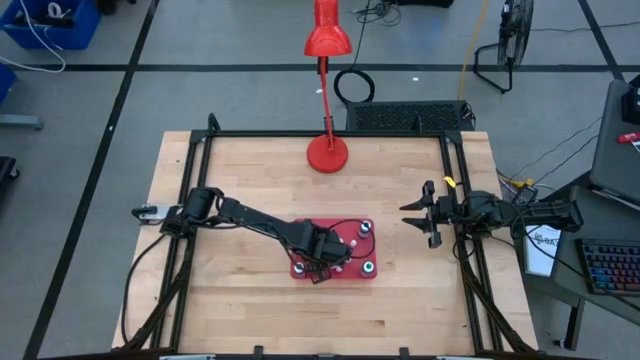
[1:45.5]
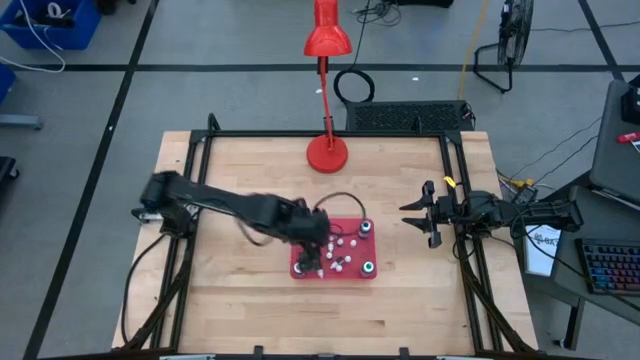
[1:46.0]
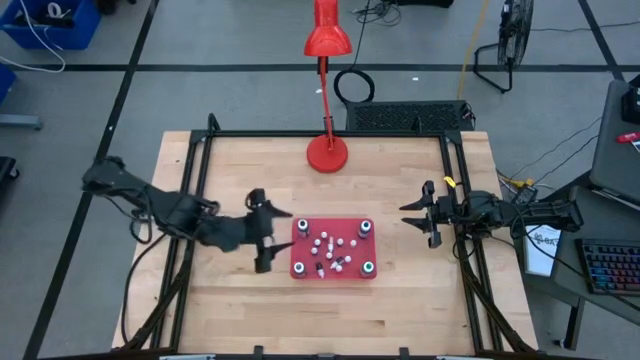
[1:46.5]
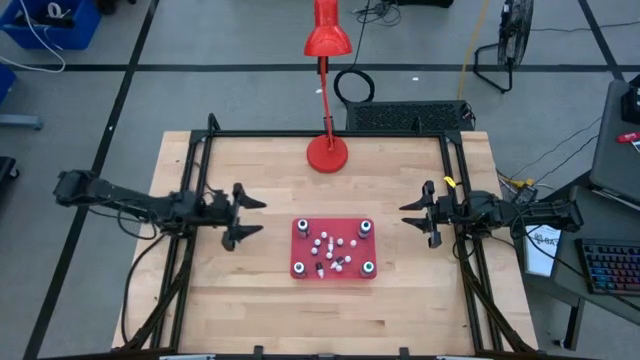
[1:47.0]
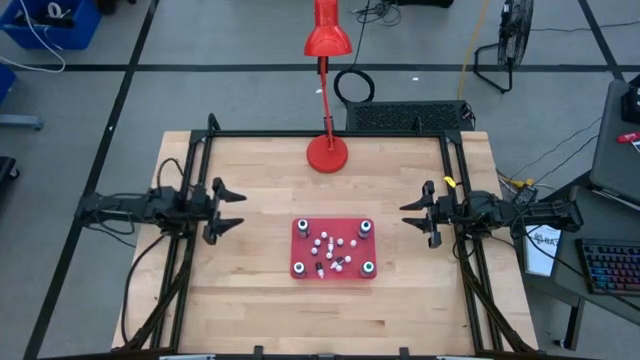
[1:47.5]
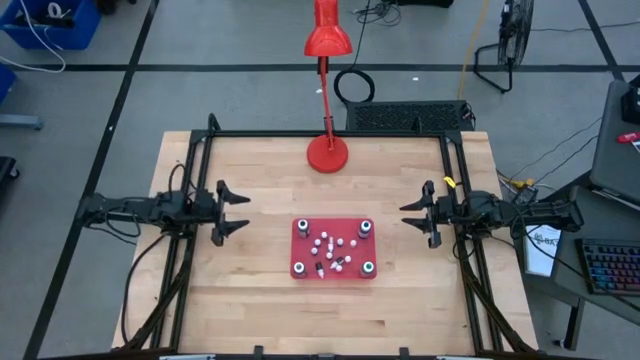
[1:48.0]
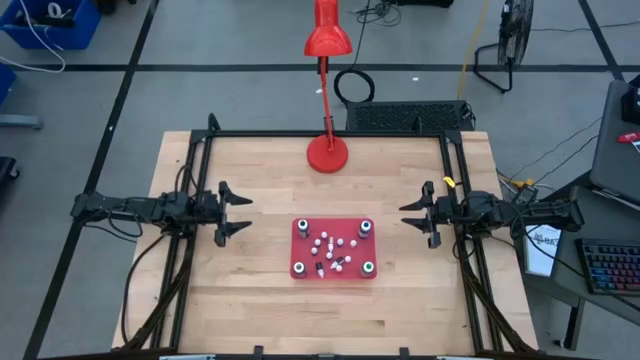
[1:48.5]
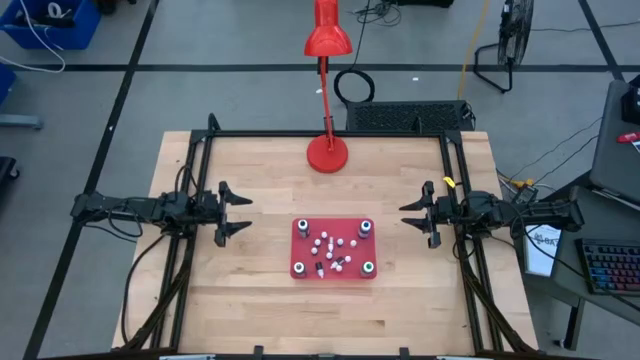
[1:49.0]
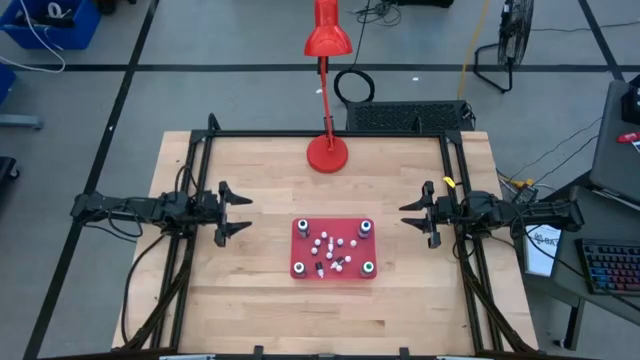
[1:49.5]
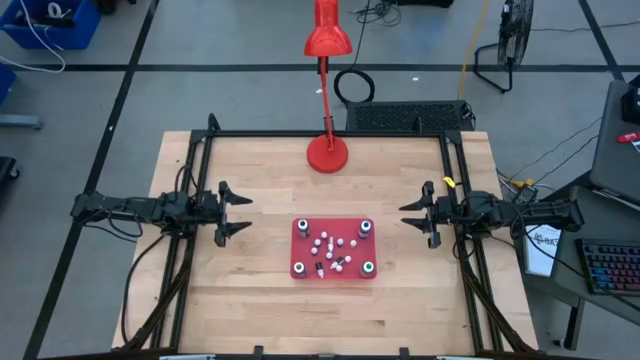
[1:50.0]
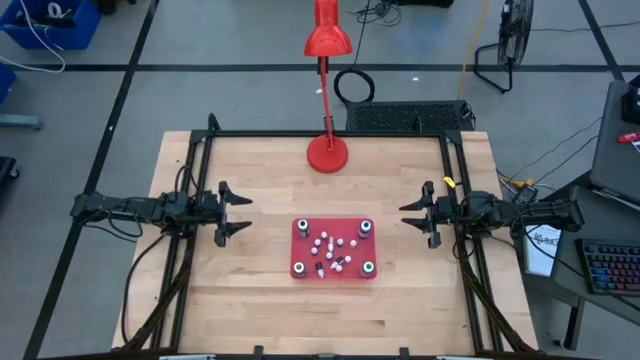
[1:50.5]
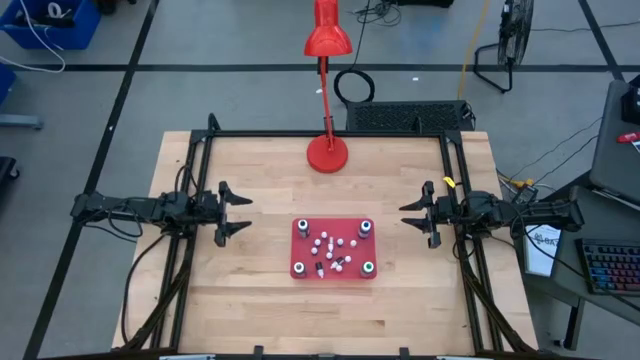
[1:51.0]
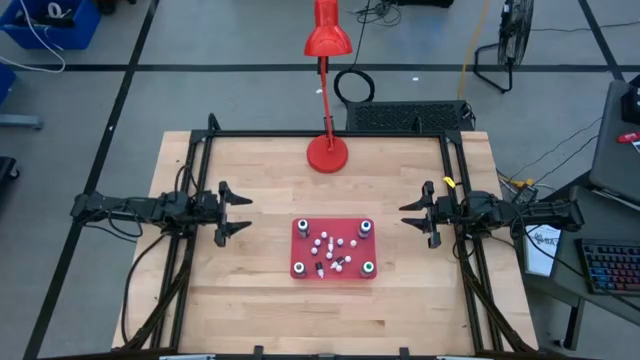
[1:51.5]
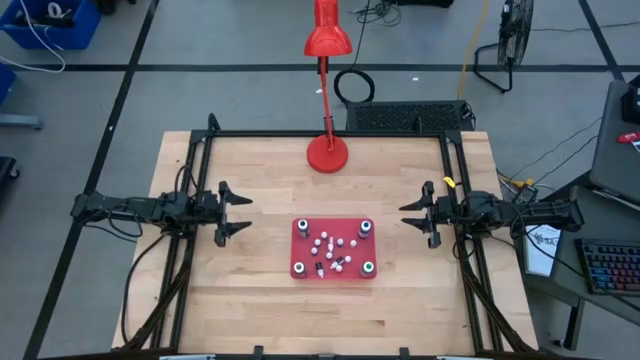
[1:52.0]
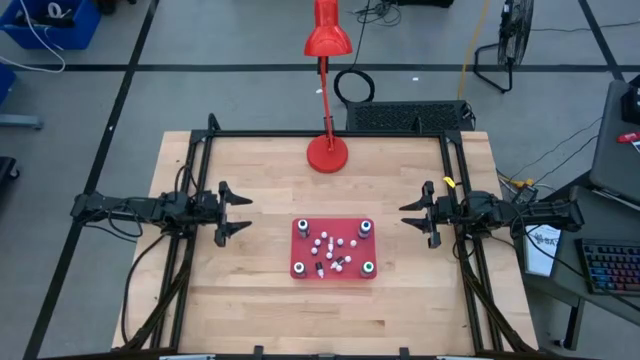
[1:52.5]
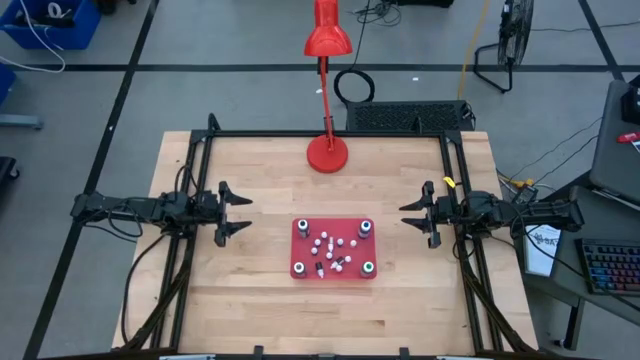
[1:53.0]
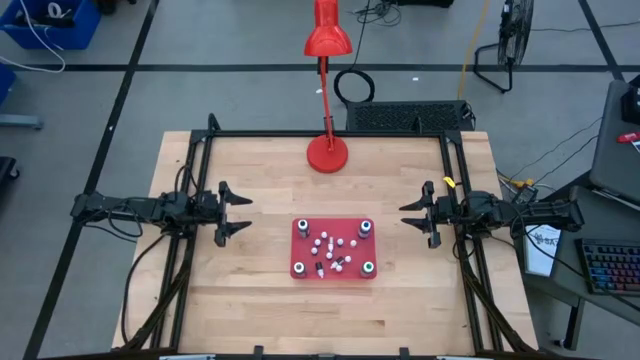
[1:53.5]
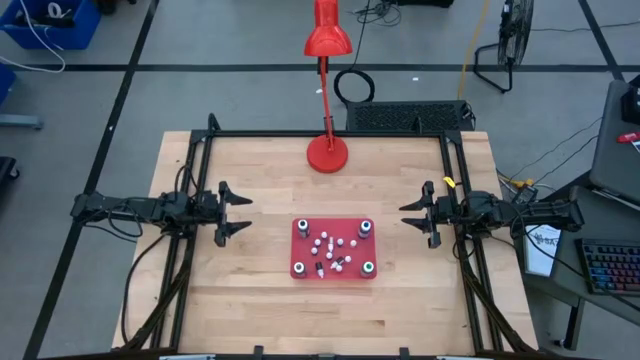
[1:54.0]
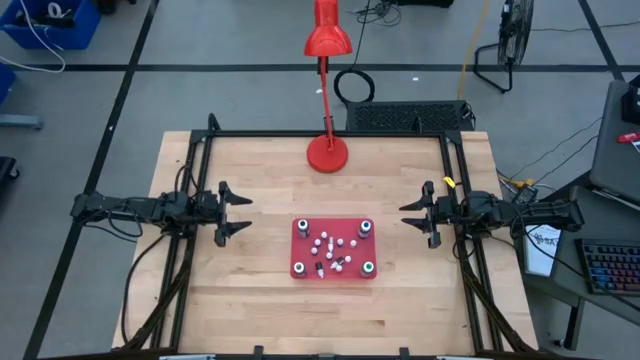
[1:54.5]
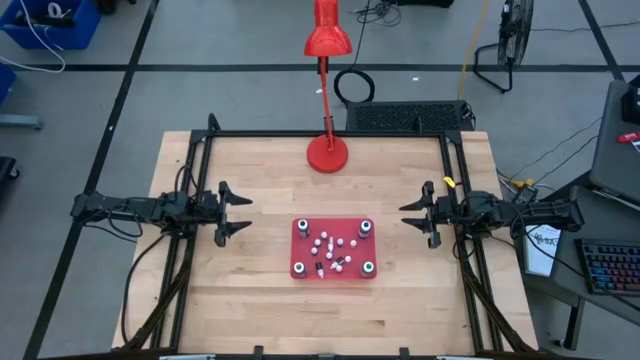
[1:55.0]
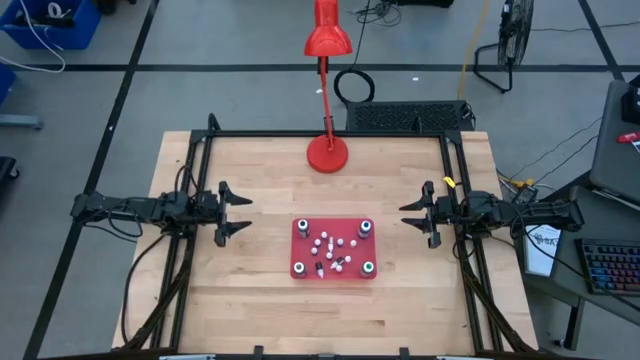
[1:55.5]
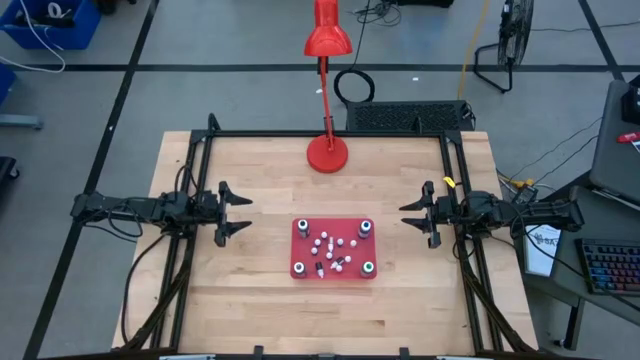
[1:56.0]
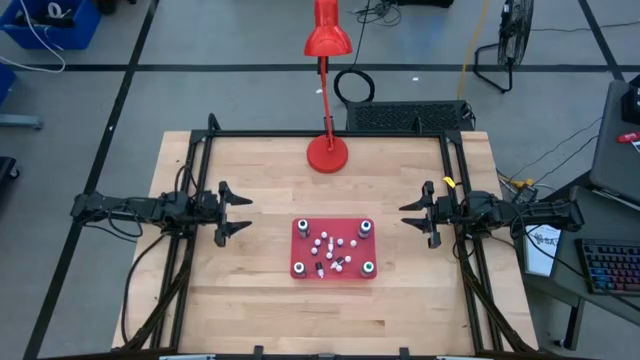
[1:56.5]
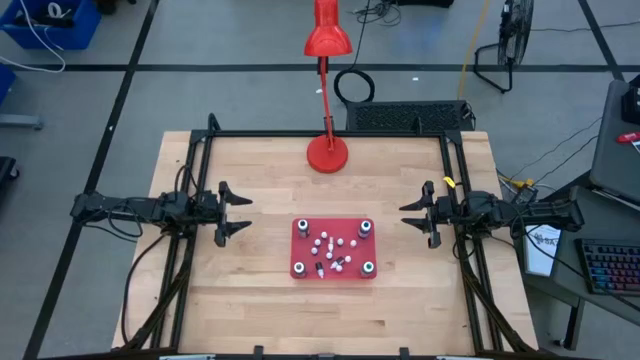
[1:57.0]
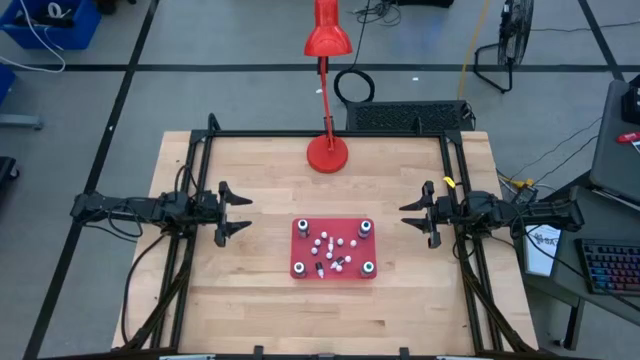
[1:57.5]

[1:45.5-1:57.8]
Task: Pick & Place food coloring
Return to Home Position

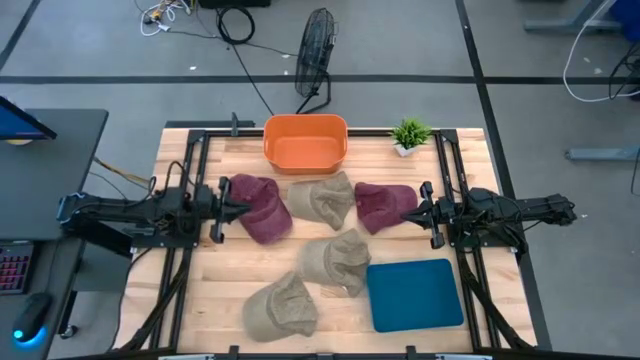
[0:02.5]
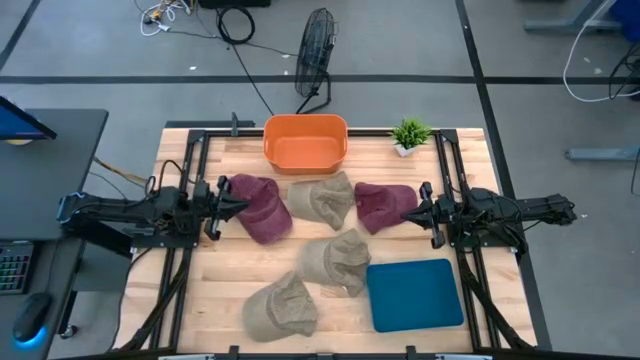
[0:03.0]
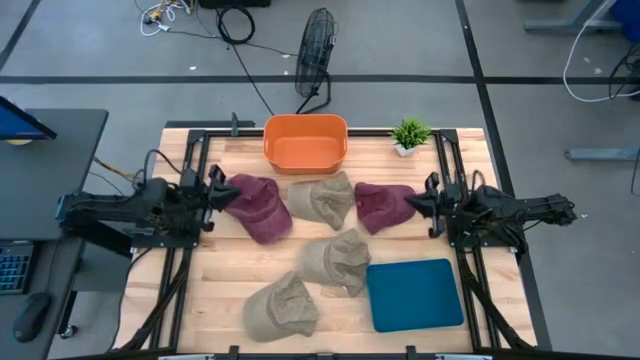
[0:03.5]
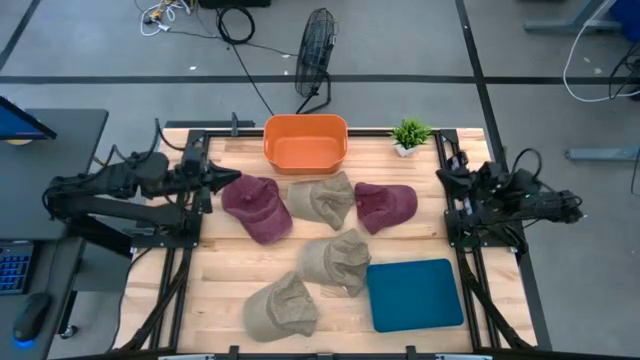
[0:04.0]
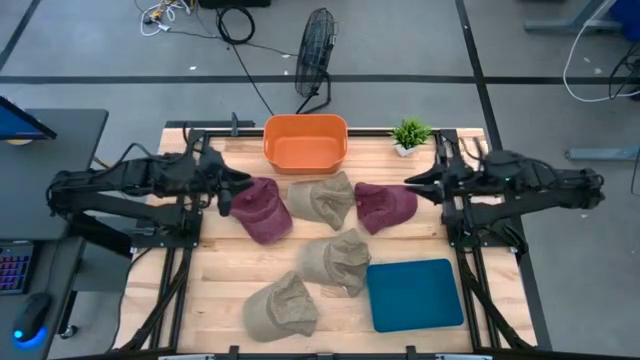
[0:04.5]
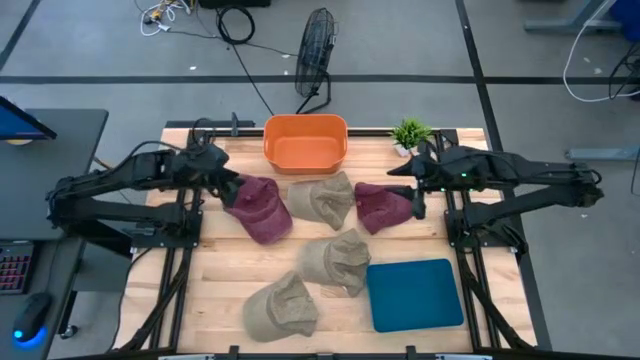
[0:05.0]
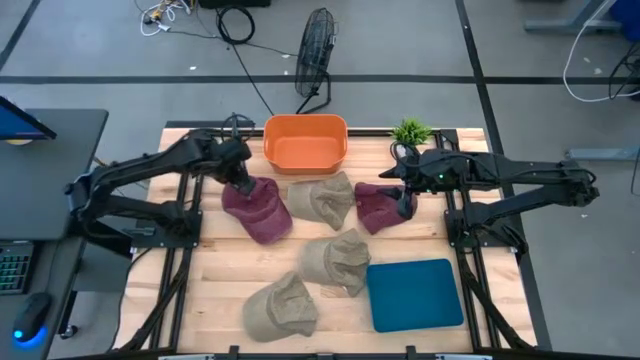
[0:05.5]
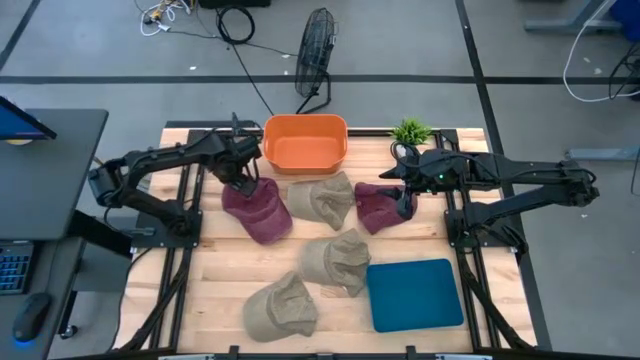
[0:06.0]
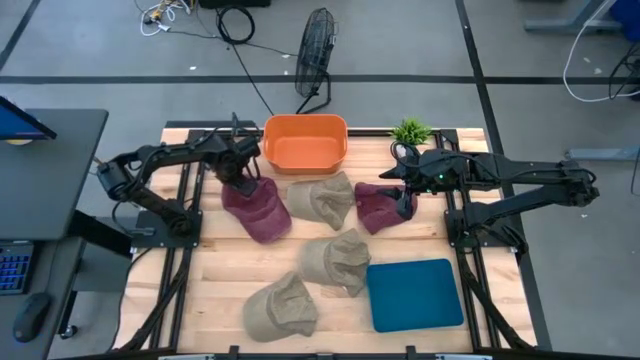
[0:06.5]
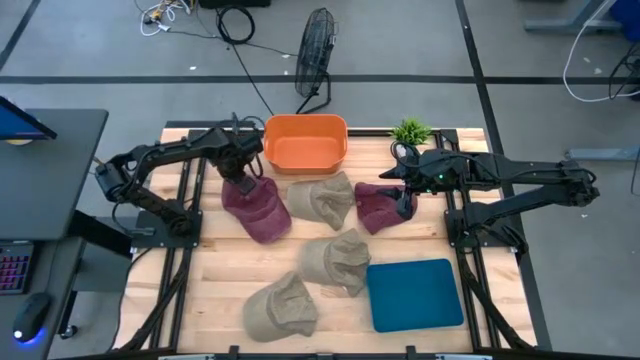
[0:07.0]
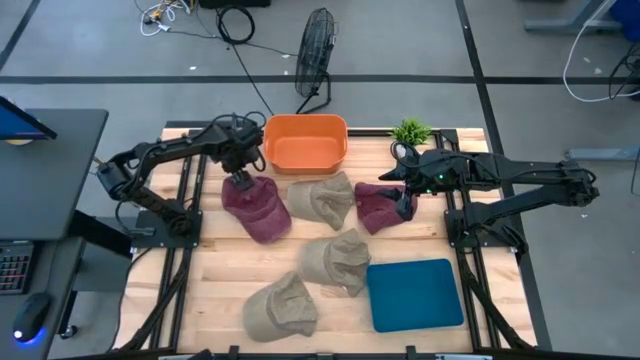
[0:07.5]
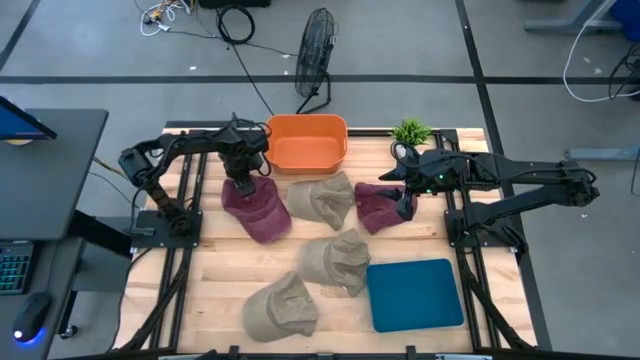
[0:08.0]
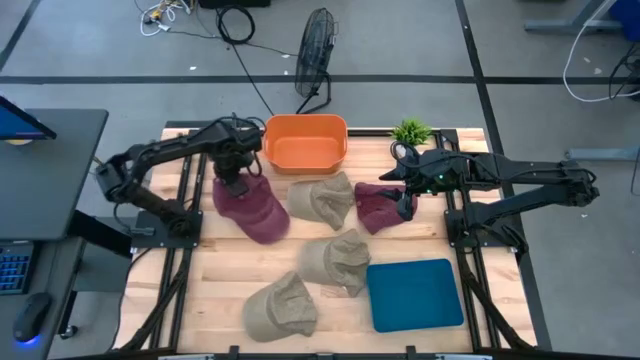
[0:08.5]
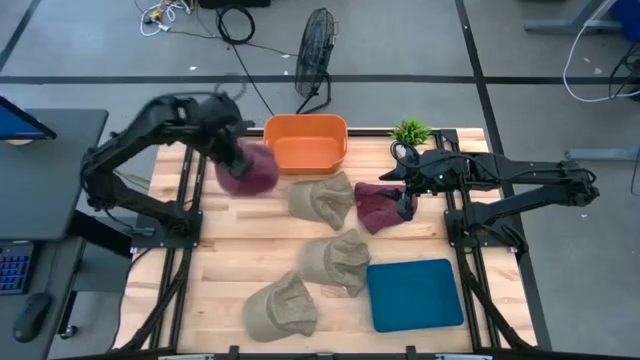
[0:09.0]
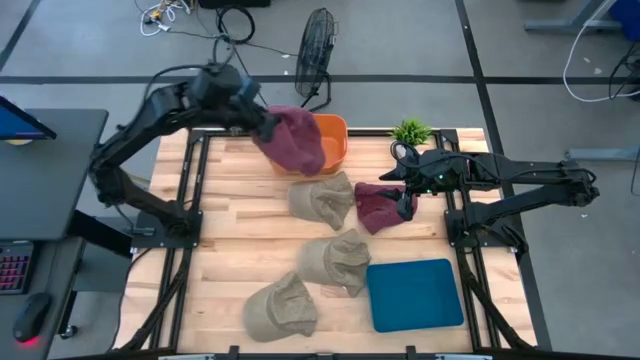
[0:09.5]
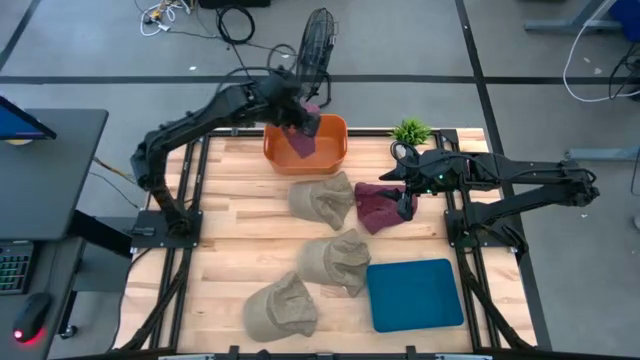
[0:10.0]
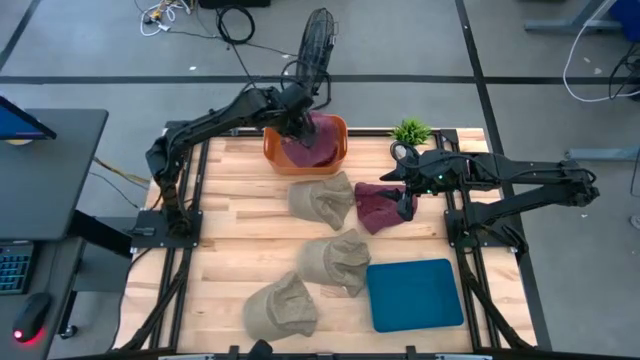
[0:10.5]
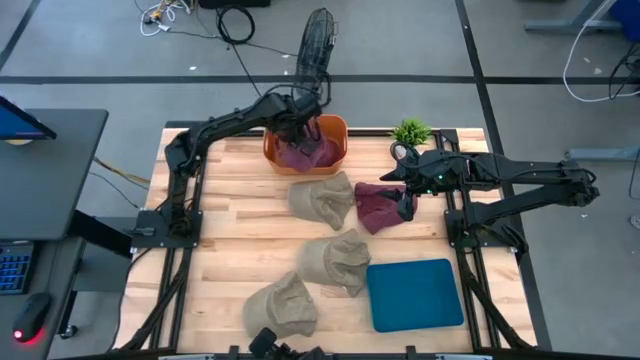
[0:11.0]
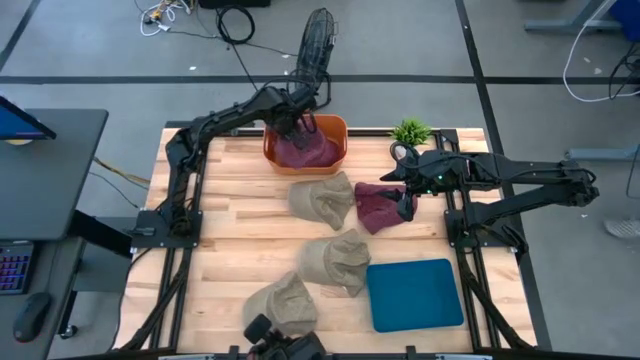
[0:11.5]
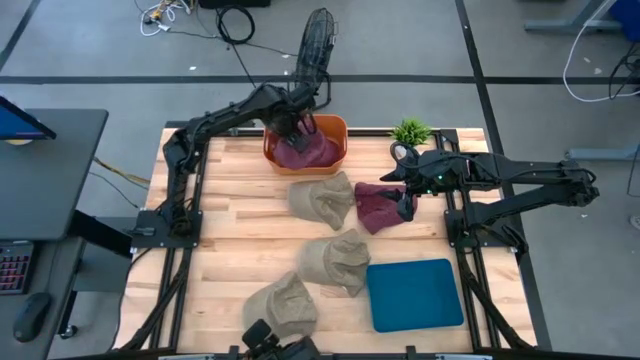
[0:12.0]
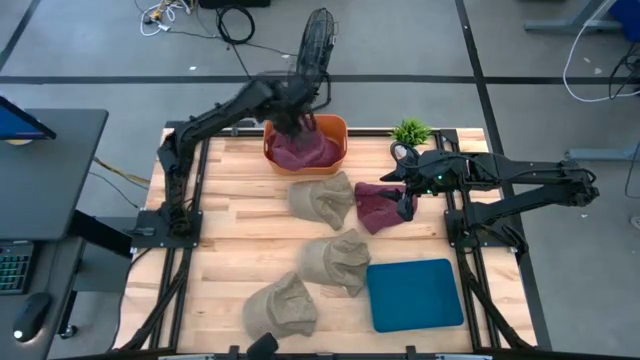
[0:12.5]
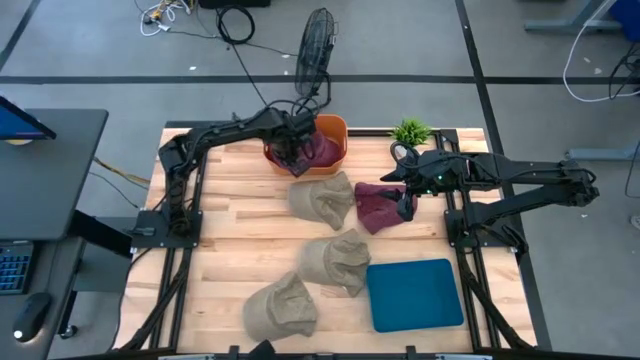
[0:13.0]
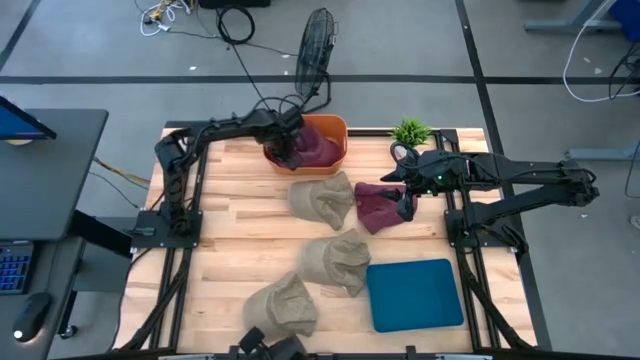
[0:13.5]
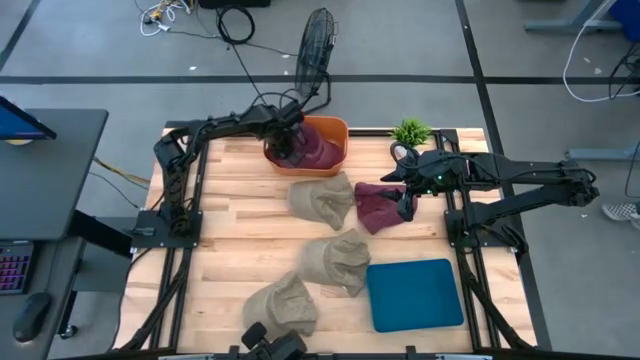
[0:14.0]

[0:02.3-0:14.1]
Task: Pick & Place hat
Put the left red cap into the orange bin
